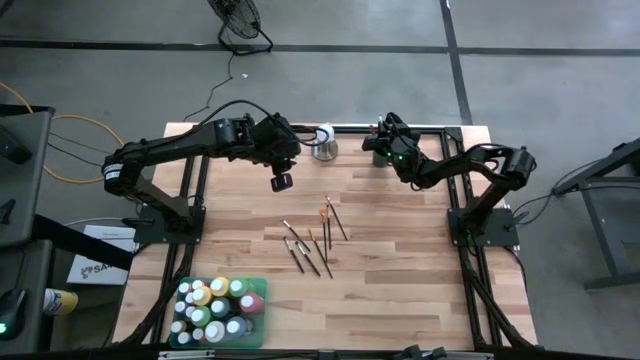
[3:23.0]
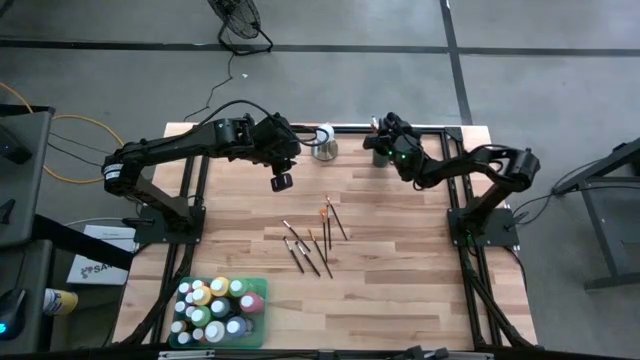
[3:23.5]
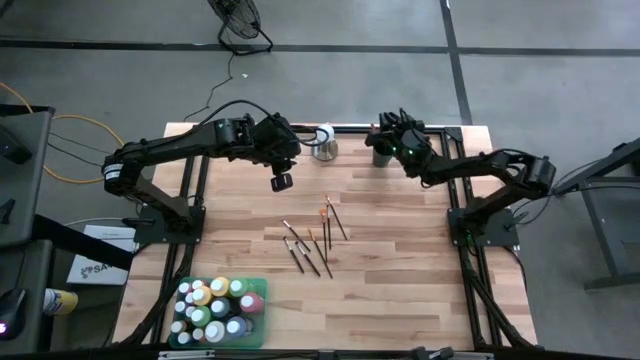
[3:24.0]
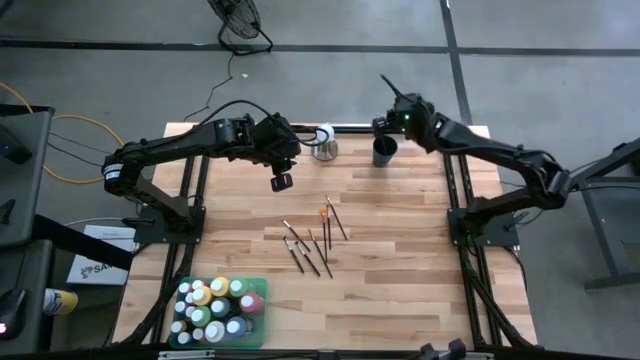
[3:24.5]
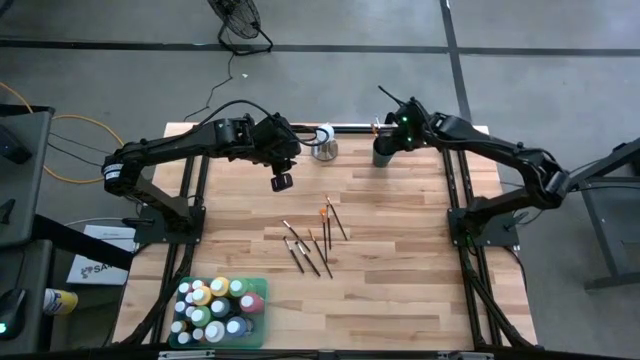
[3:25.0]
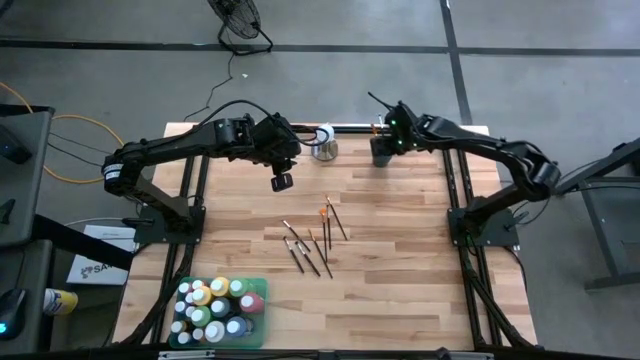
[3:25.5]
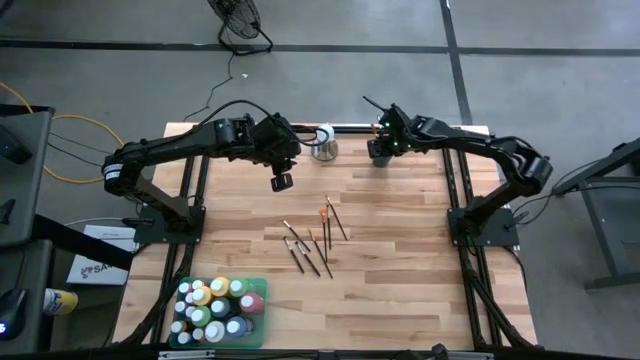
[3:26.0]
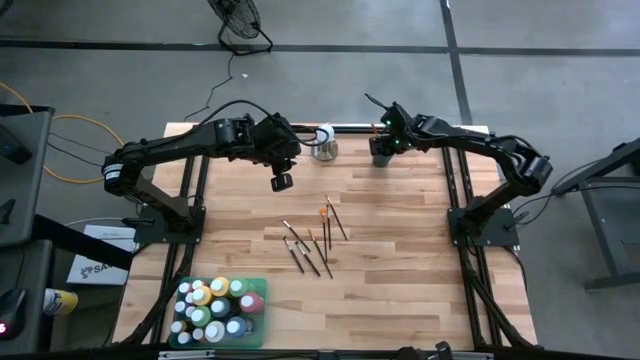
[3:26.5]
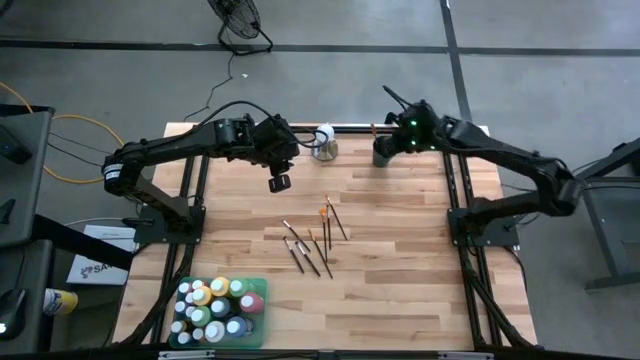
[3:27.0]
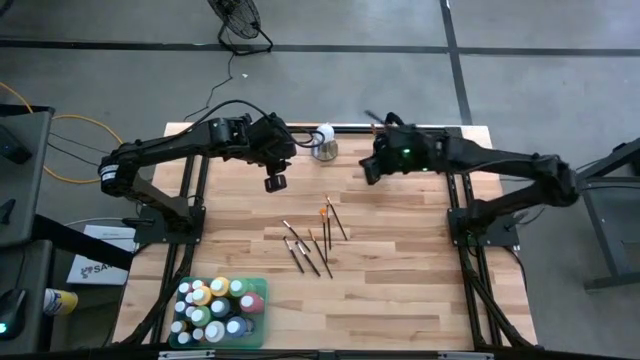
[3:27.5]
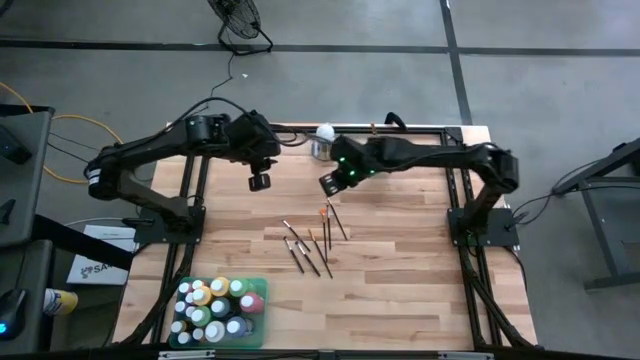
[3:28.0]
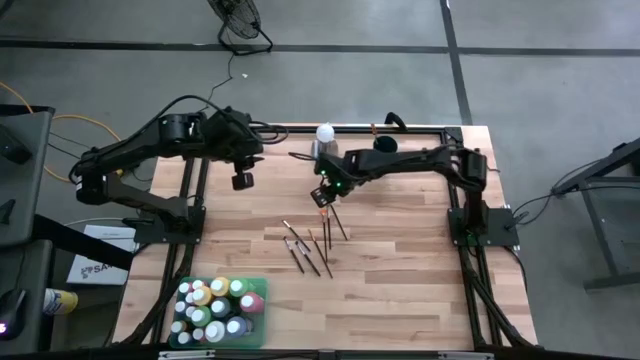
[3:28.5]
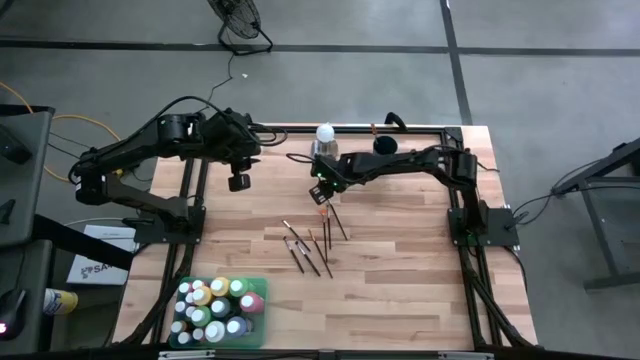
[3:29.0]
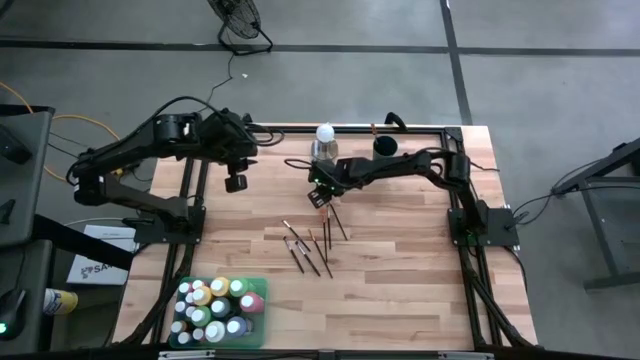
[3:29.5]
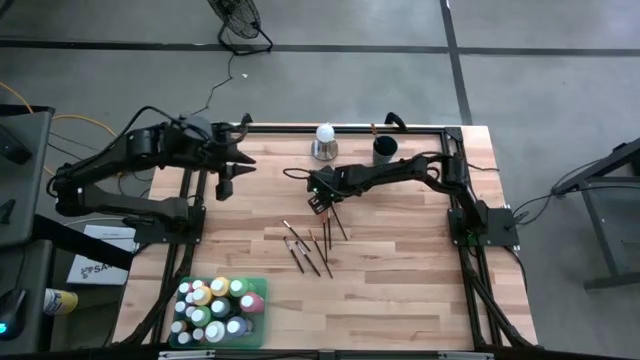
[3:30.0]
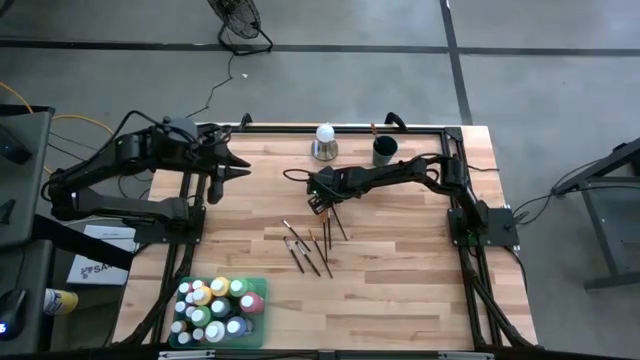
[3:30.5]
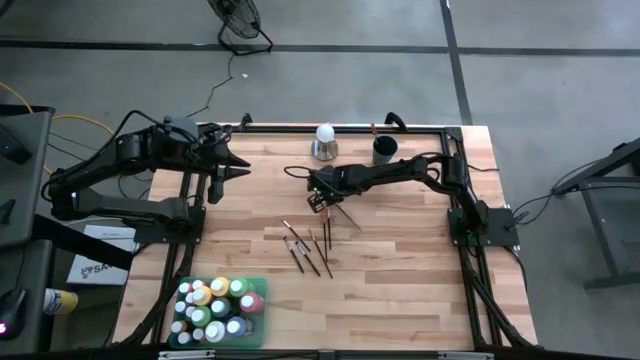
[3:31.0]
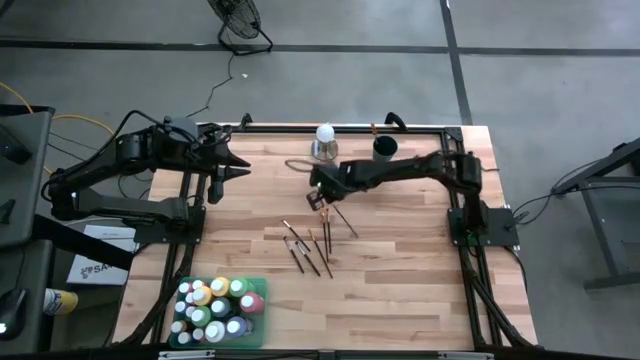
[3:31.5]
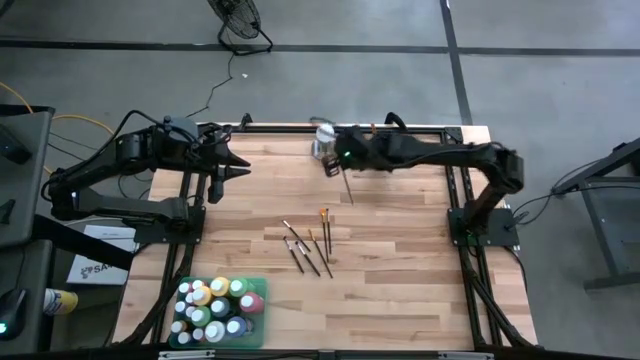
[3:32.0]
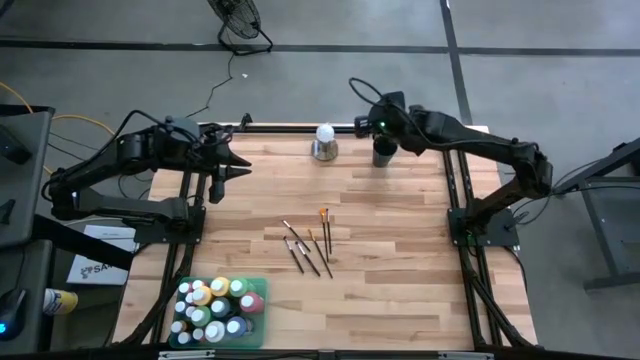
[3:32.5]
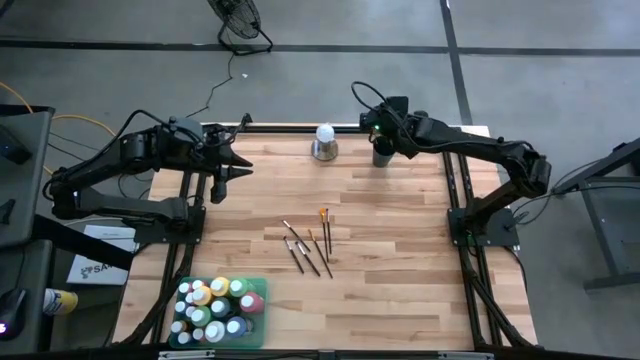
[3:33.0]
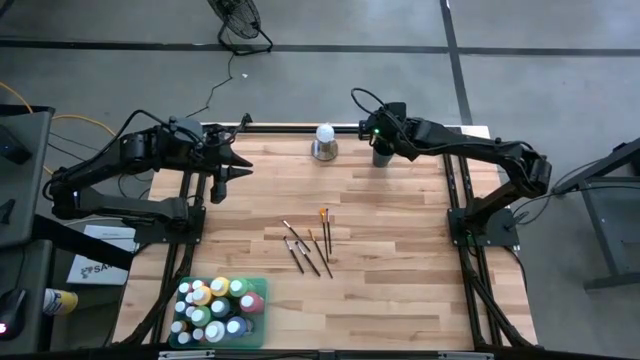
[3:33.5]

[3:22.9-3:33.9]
Task: Pick & Place Paint Supplies
Put the paint brush into the black cup

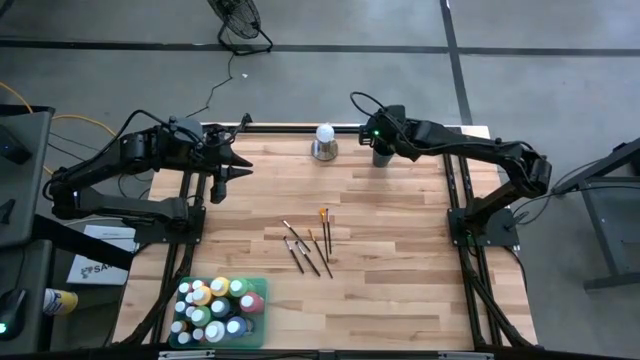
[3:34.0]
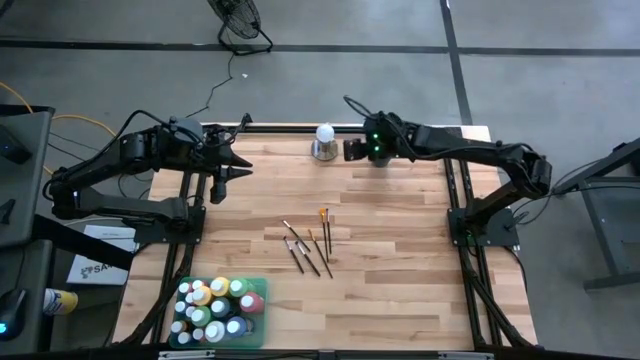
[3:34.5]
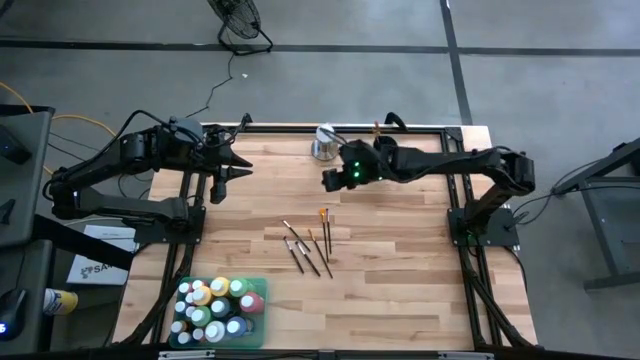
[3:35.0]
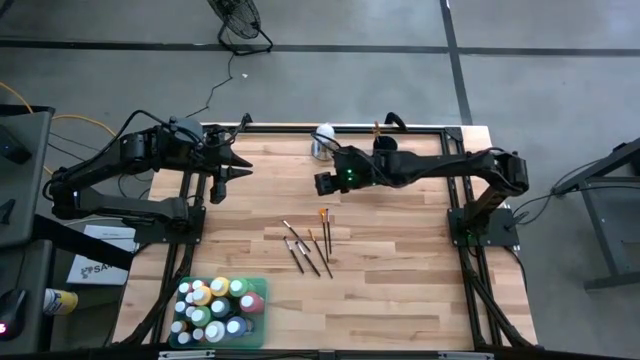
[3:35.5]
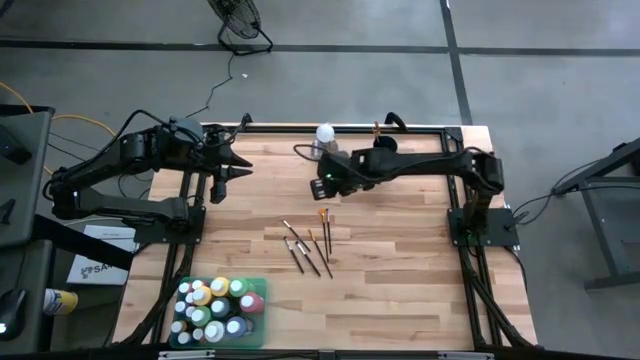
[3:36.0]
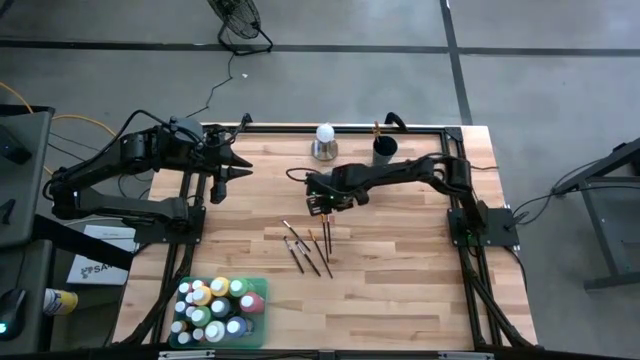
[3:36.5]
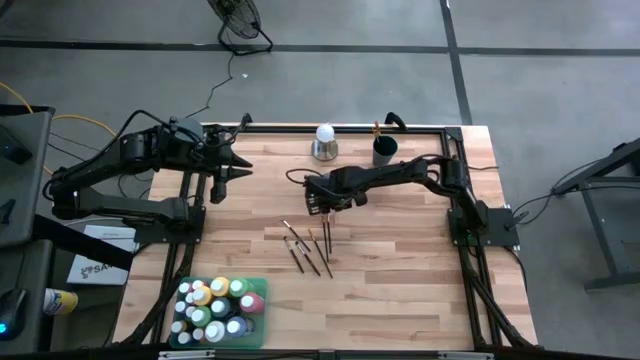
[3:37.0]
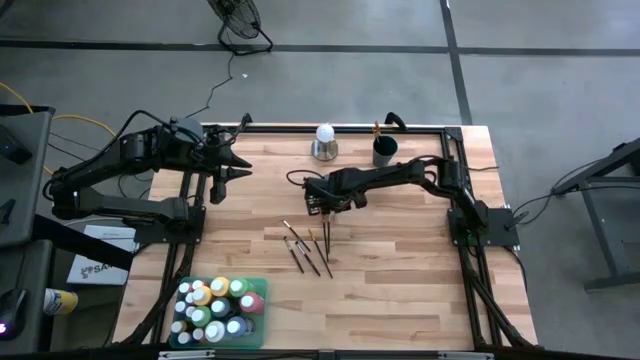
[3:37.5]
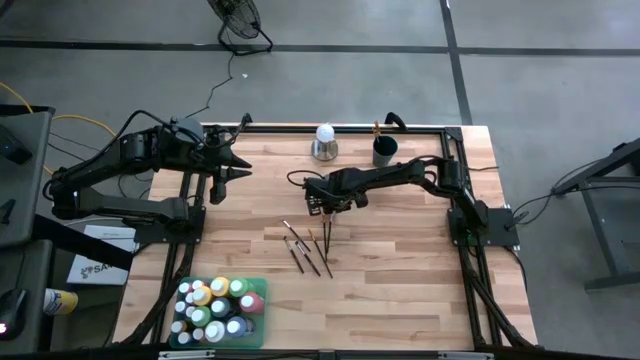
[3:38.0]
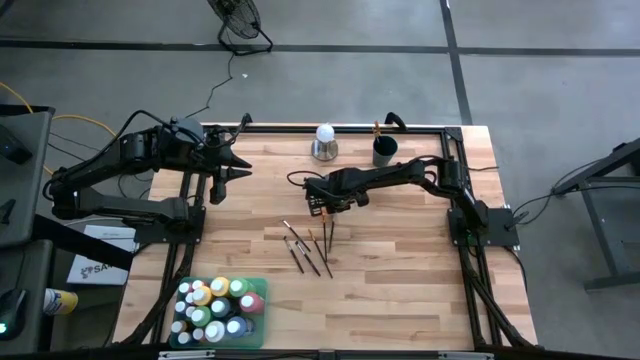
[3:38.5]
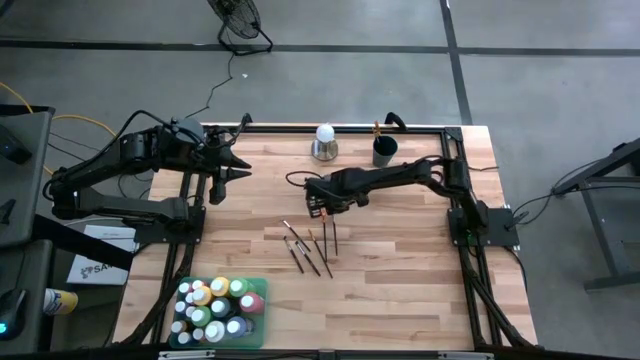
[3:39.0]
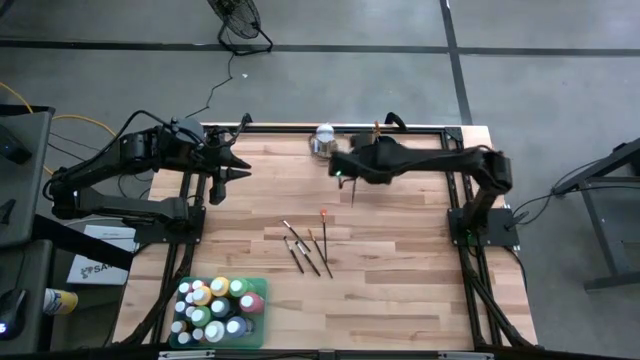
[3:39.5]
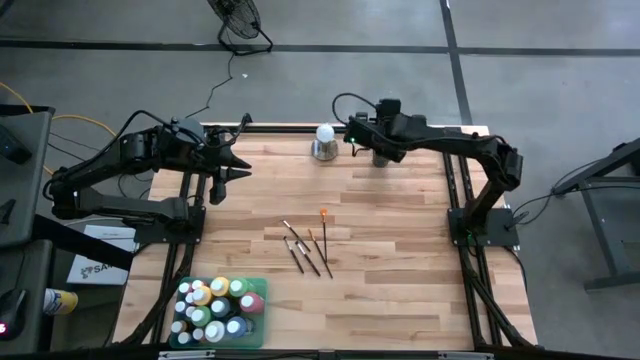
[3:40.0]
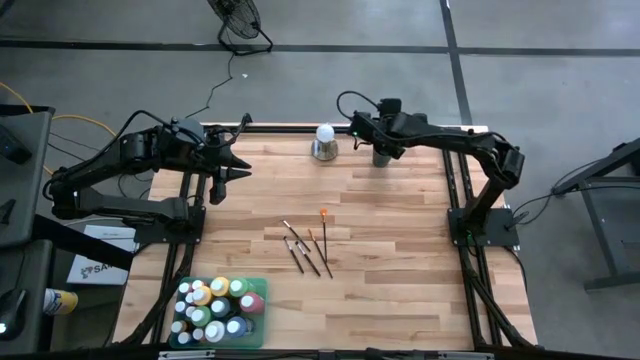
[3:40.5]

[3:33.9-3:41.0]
Put the gold paint brush into the black cup

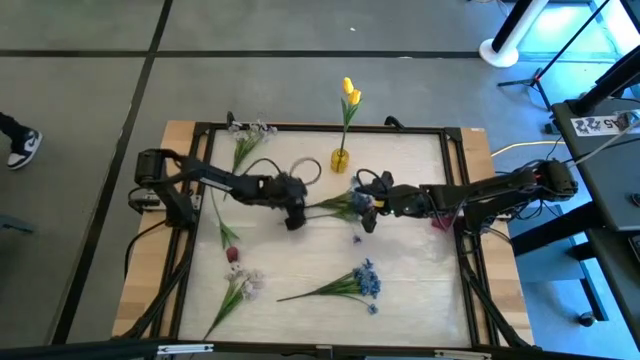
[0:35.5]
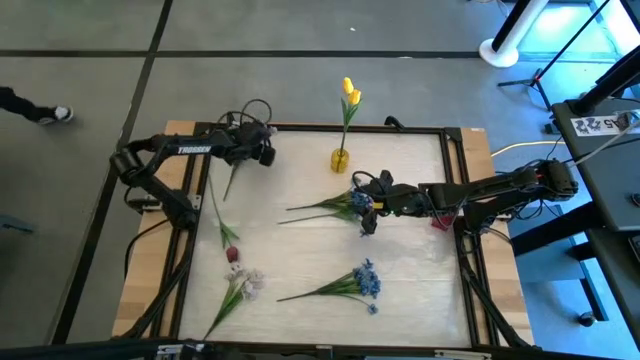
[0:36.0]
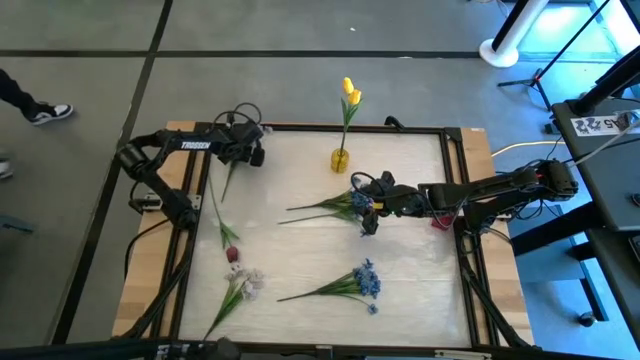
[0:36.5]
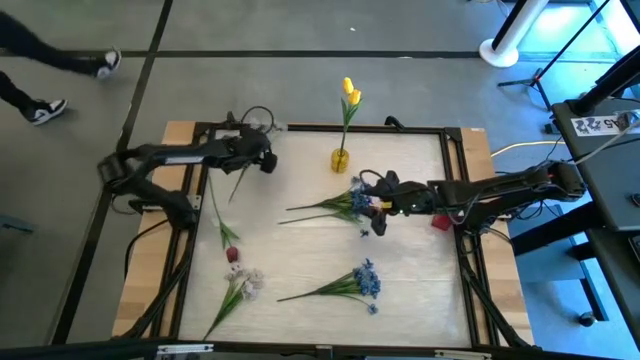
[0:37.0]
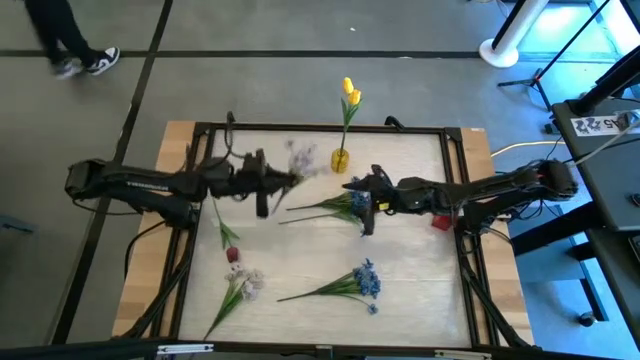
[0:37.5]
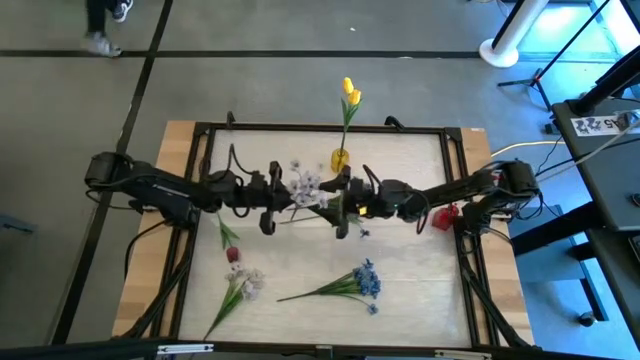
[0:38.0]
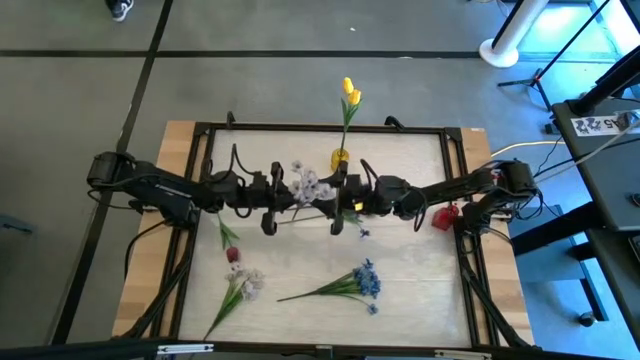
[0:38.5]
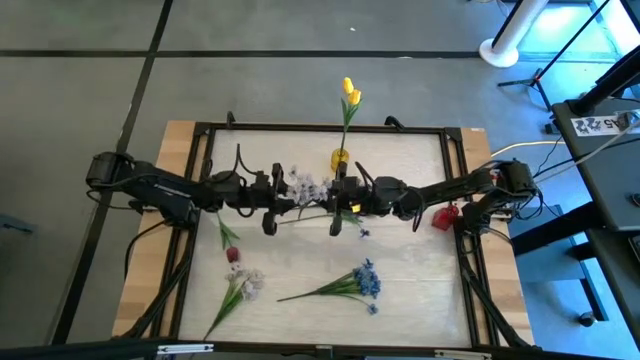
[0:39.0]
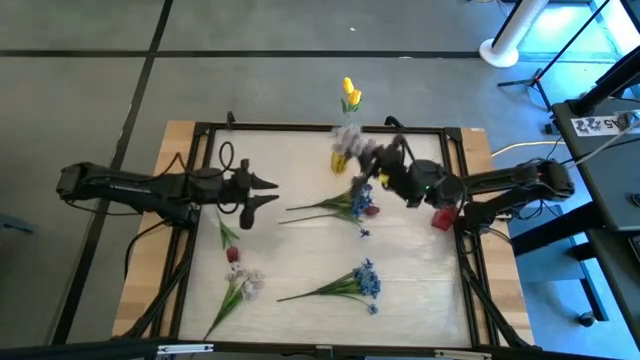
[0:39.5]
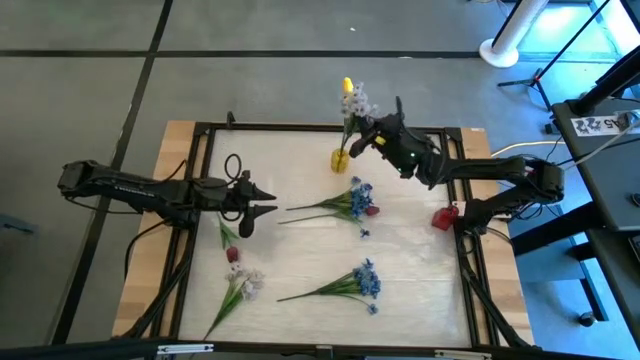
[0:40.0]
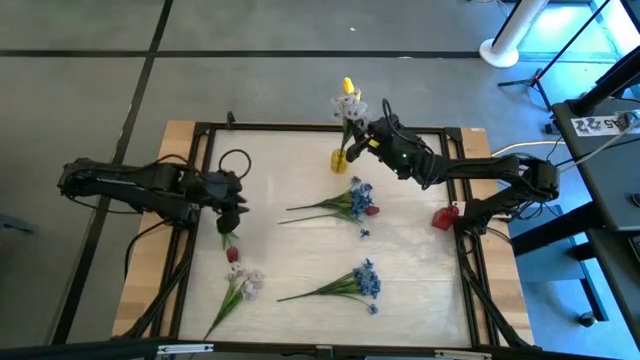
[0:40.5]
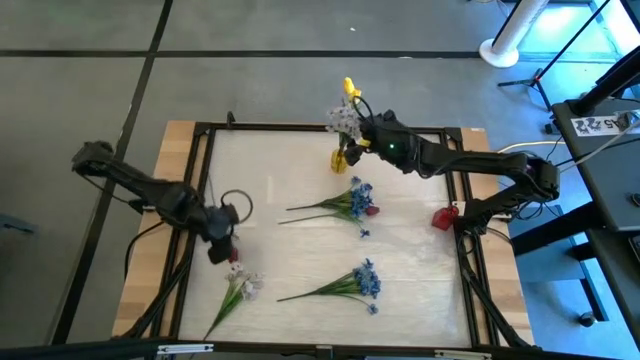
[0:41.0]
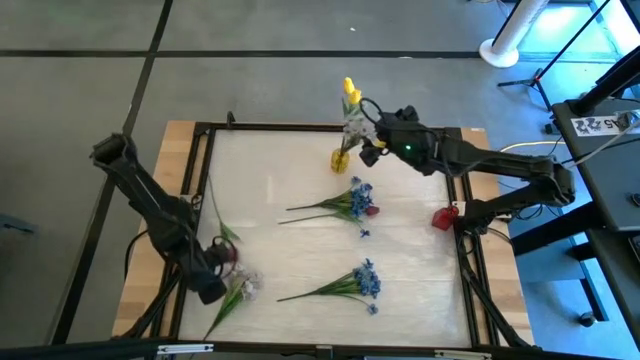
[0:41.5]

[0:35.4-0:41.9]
Task: Sort flowers into vase by color
Put the top white flowers into the yellow vase
